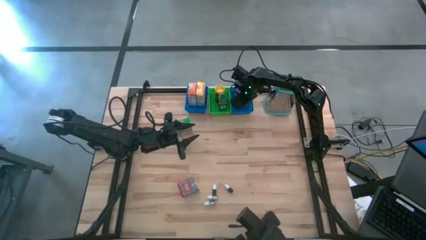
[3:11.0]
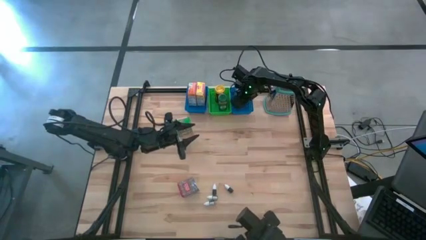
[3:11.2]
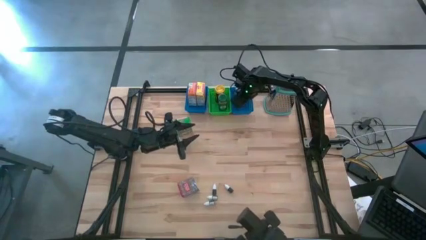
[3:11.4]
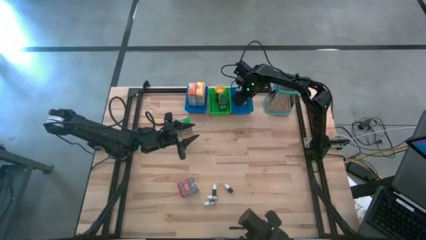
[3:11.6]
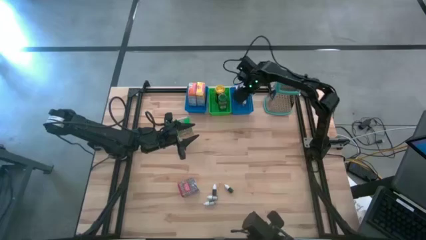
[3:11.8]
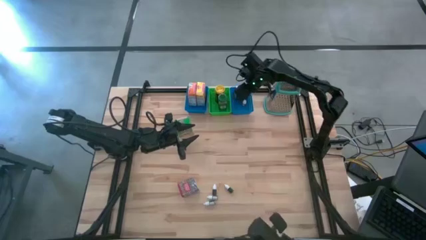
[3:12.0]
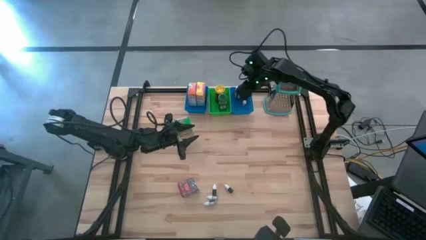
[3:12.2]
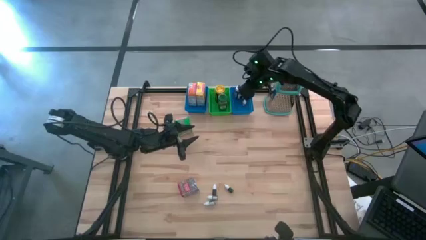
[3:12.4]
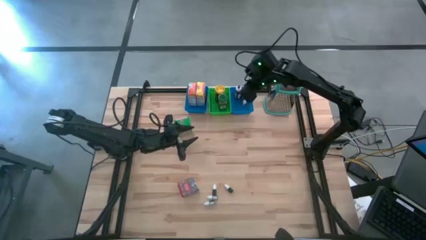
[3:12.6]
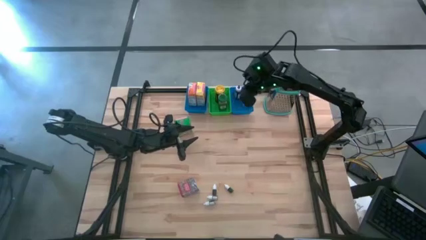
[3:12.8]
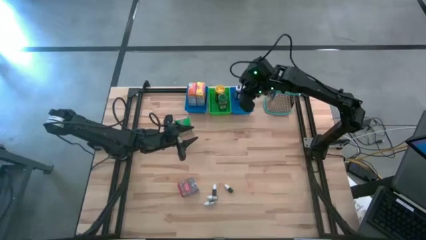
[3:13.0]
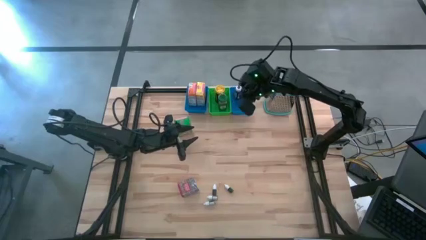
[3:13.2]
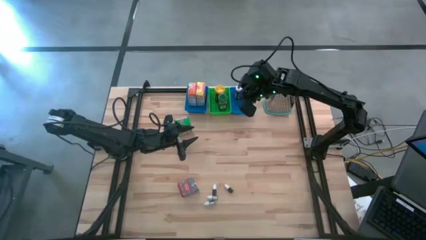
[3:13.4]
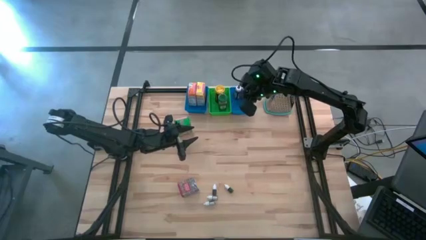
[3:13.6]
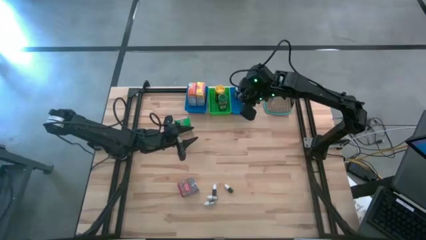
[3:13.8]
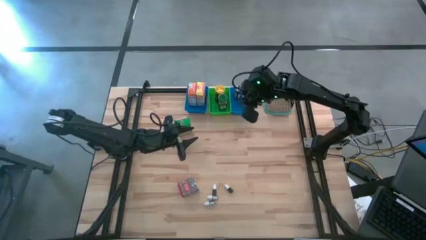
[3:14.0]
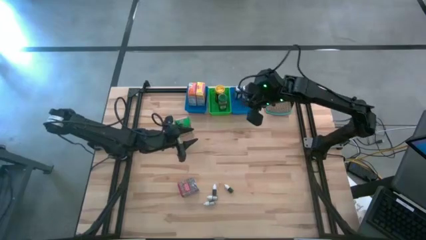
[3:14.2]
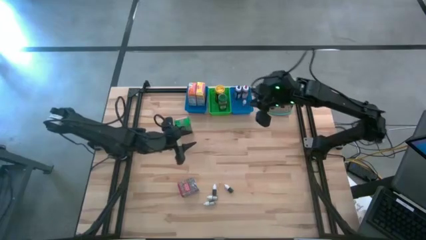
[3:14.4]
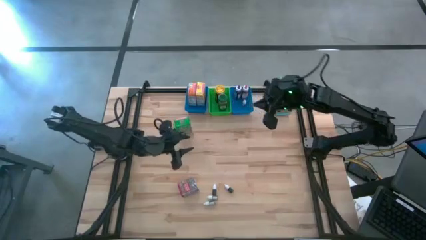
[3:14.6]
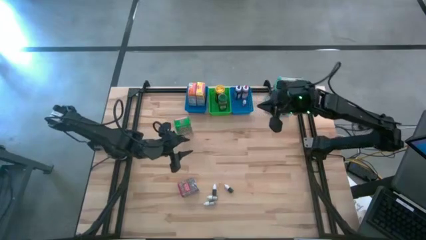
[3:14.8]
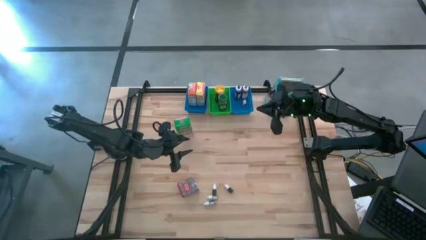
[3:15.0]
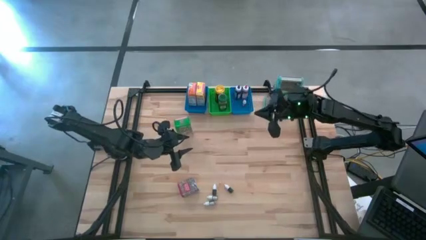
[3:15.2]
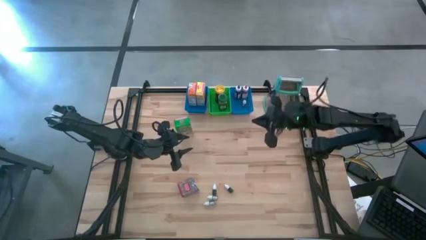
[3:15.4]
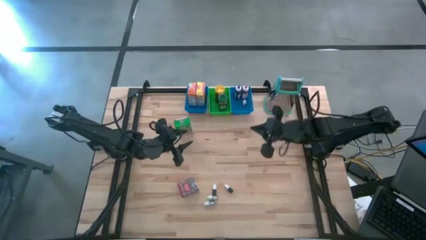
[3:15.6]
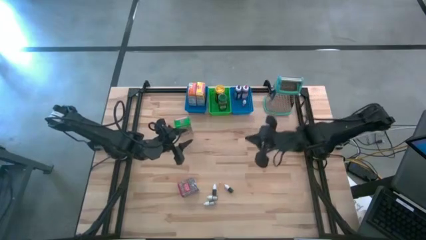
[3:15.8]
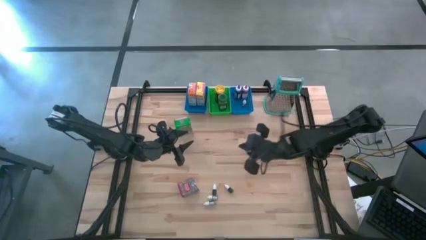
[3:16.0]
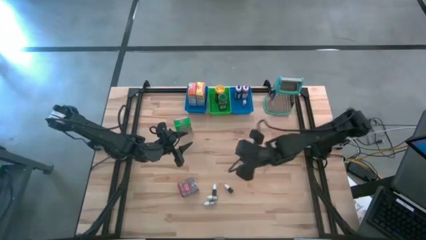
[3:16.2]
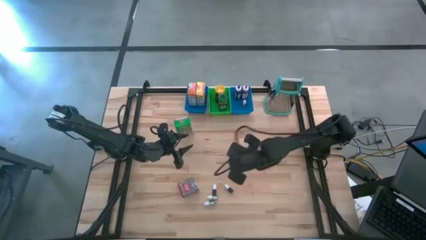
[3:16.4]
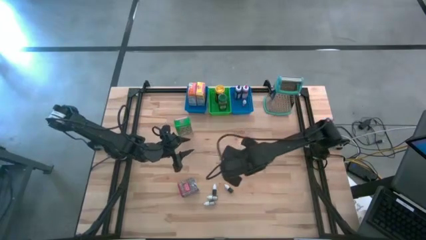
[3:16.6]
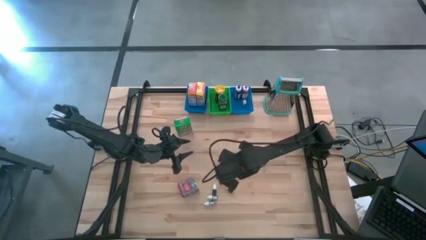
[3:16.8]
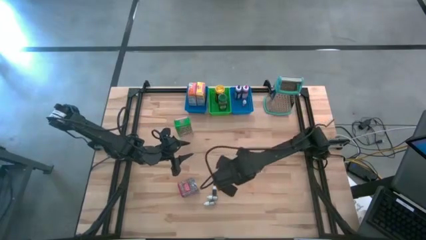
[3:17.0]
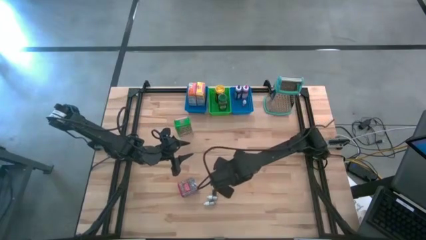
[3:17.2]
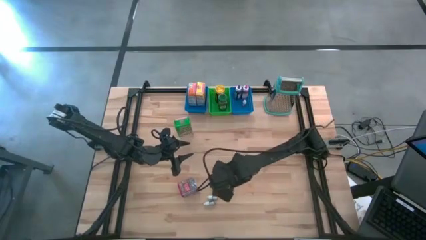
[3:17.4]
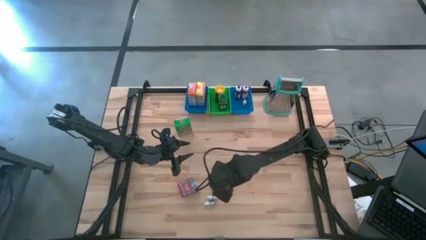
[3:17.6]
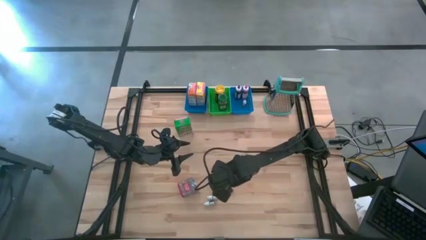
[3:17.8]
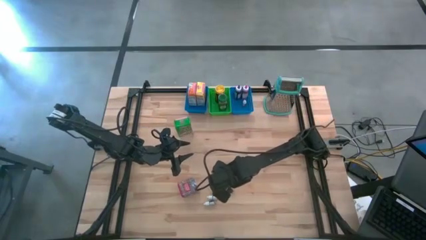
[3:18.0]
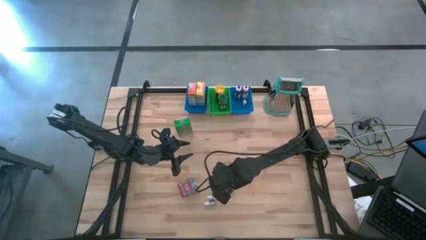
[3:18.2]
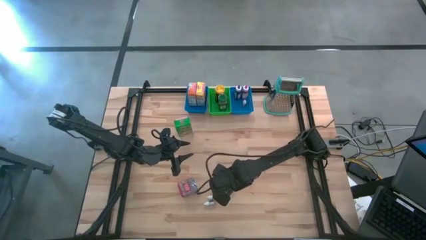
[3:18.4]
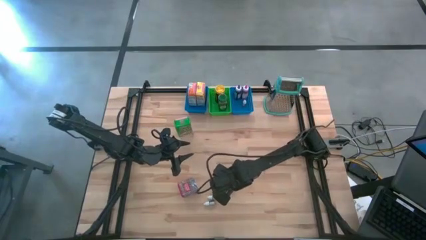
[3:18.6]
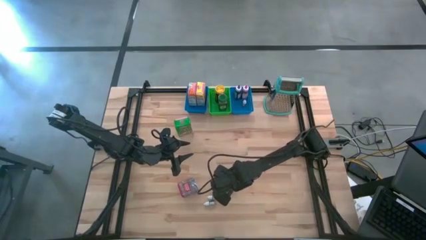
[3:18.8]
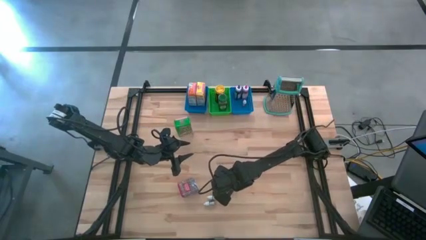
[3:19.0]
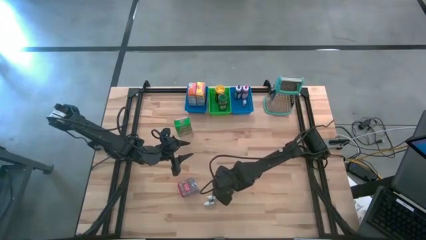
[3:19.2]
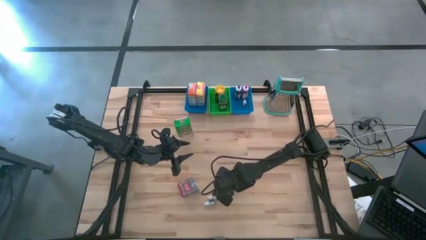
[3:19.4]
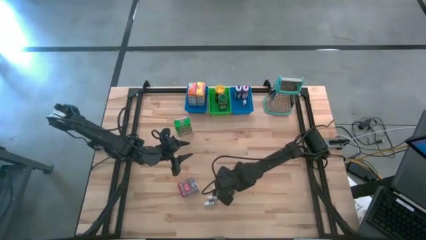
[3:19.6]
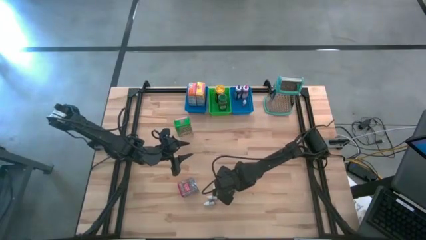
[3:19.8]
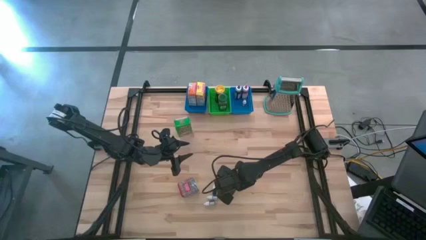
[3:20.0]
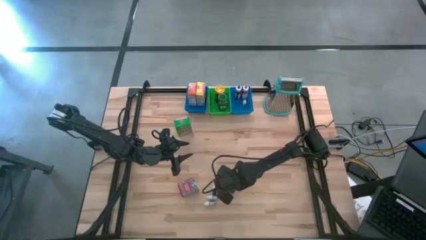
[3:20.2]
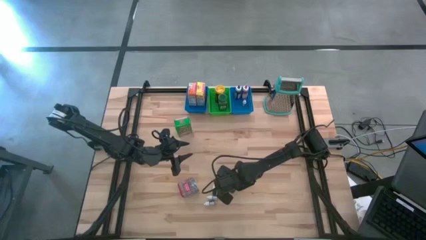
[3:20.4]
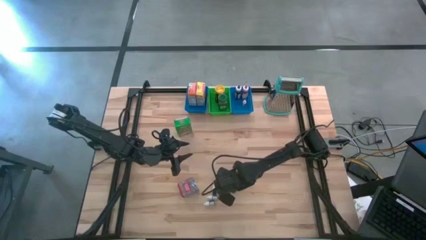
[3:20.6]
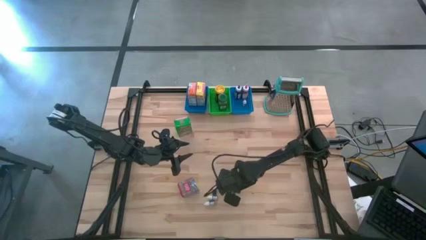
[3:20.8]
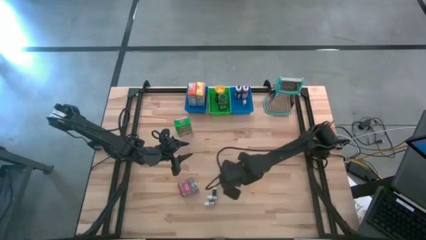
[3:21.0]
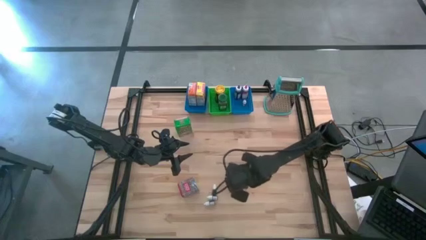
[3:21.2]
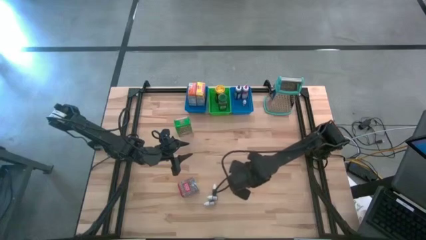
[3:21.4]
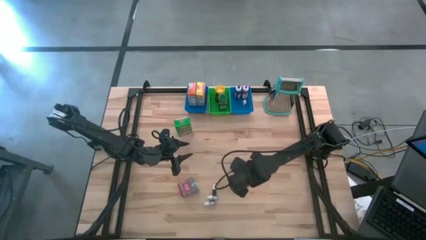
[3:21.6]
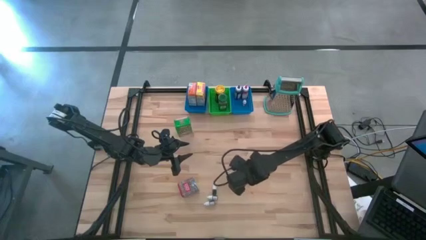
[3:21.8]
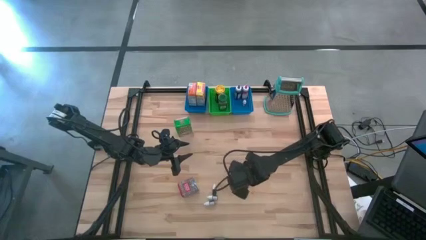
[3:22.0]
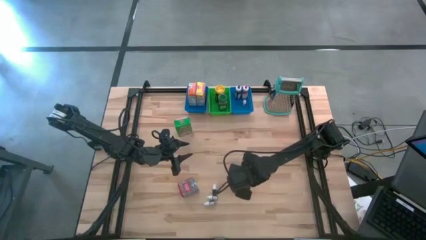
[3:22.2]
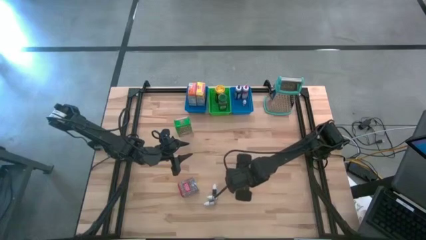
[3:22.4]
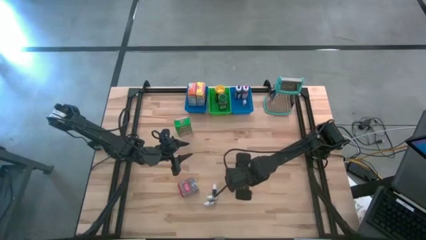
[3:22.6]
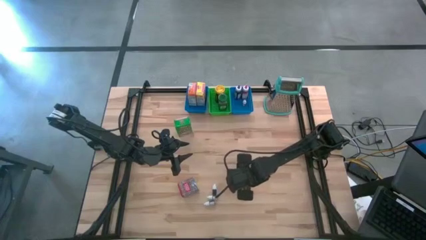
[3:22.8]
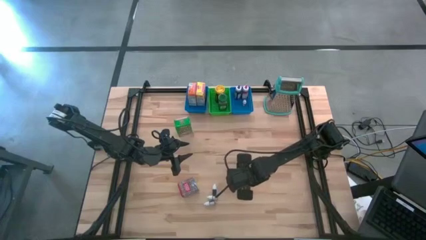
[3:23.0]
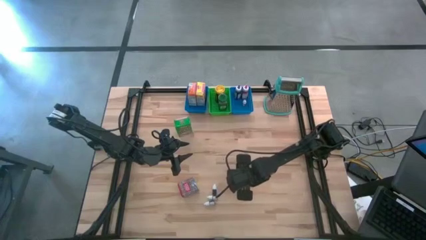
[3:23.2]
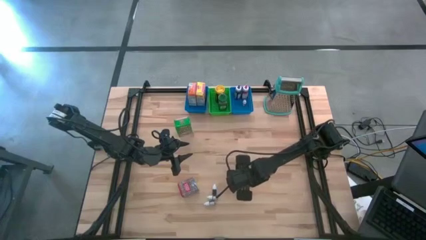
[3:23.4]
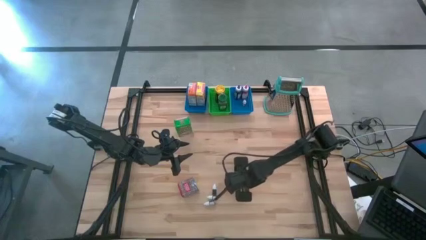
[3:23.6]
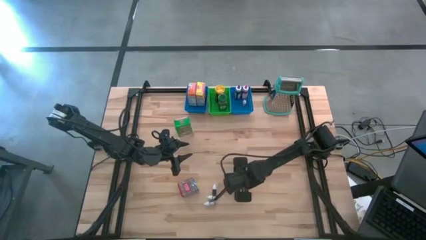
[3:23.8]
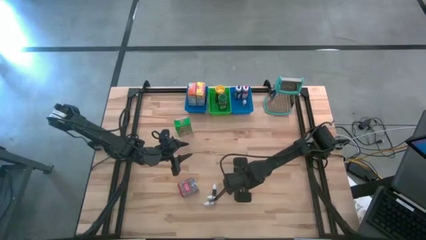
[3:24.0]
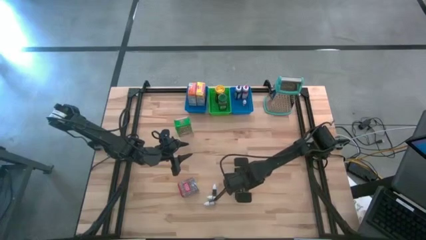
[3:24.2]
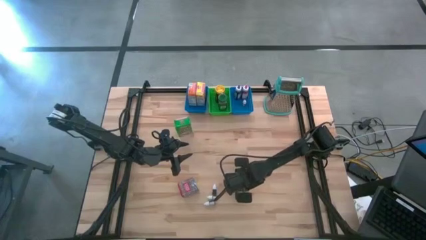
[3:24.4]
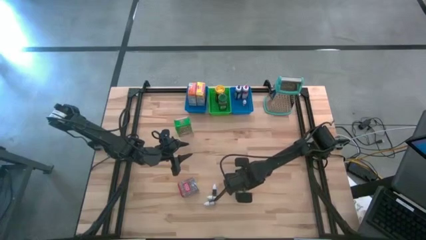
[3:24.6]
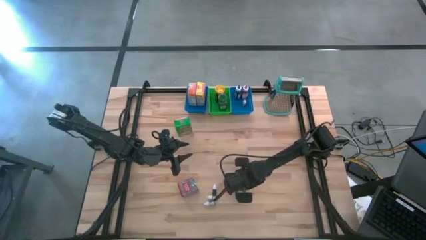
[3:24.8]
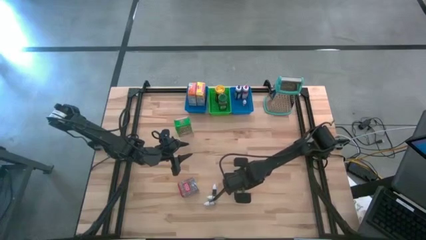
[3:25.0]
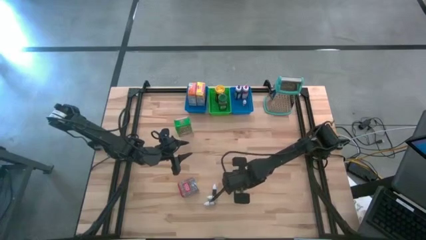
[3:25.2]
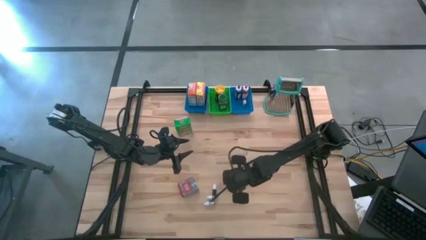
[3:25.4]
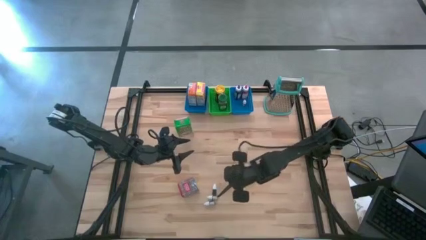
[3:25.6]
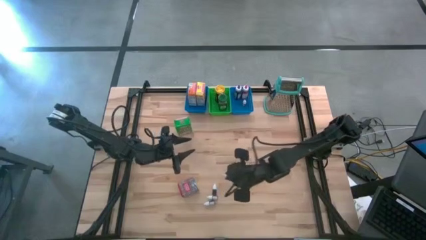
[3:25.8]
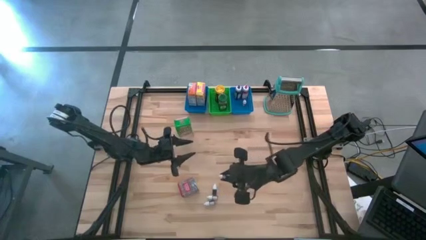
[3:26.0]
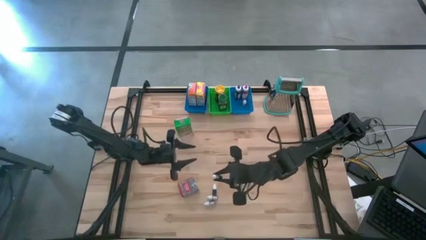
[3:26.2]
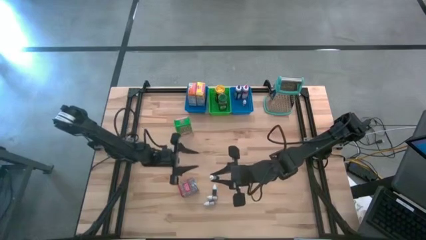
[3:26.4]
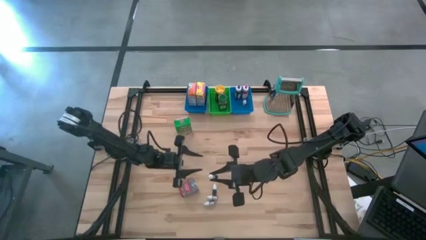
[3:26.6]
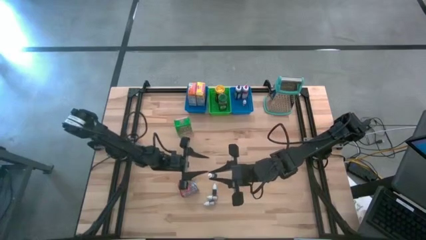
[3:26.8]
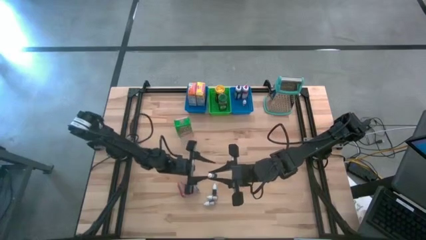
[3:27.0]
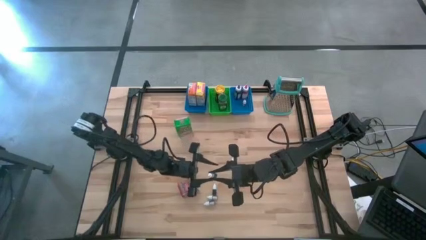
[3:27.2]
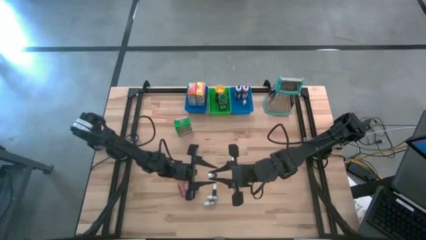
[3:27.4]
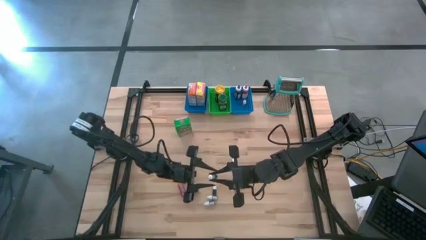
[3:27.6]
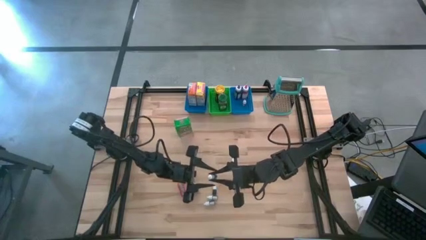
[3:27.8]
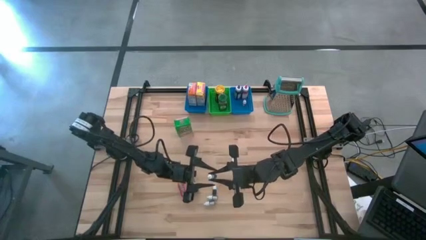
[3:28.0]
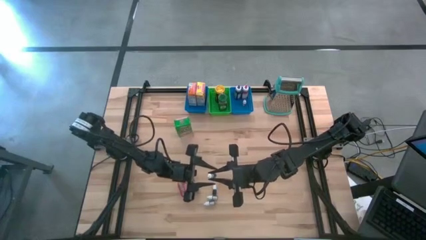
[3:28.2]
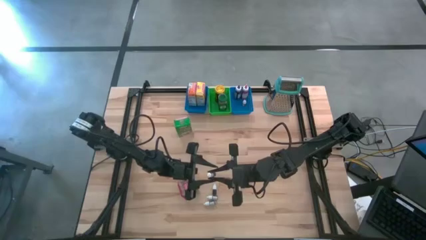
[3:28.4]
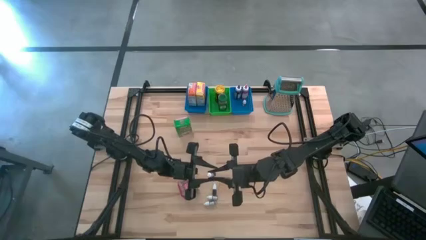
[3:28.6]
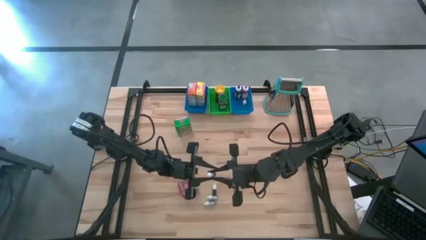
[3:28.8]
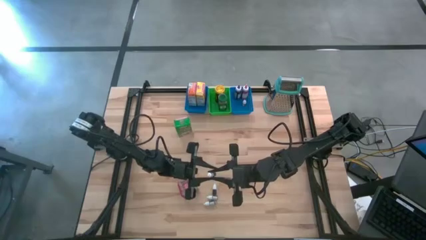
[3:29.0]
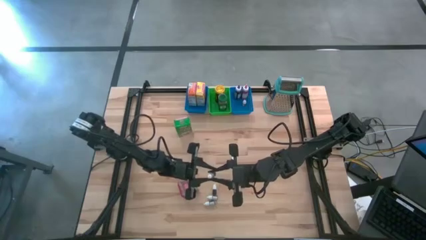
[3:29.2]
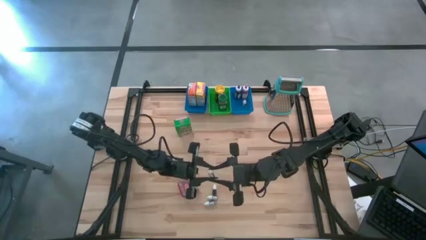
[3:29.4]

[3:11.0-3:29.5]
Task: Pick & Place Kitchen Items
Put the small green food bottle coloring into the right blue bin
